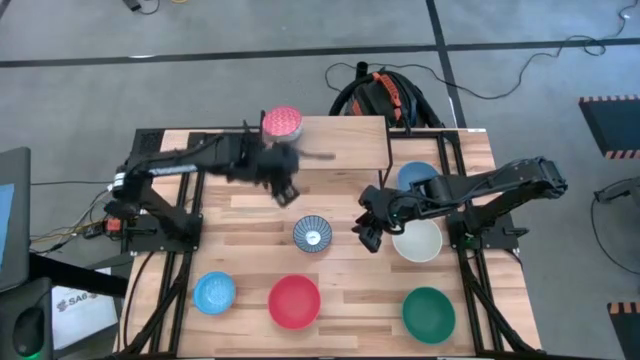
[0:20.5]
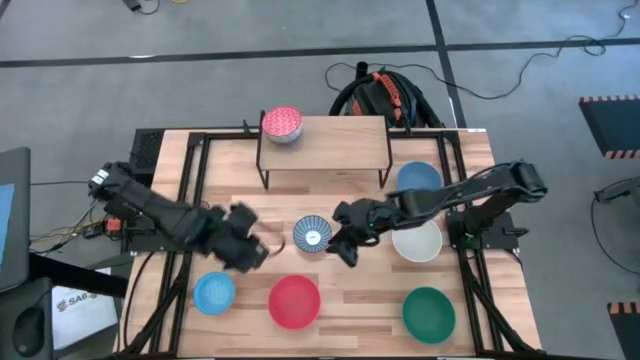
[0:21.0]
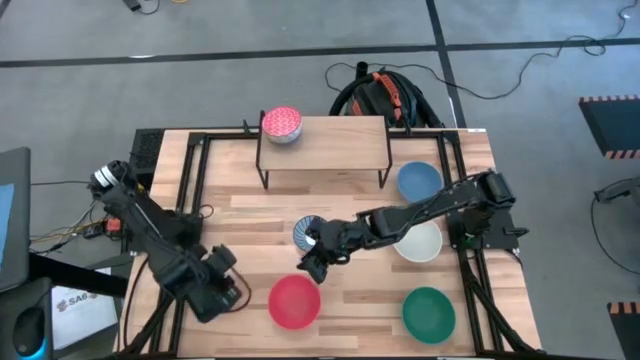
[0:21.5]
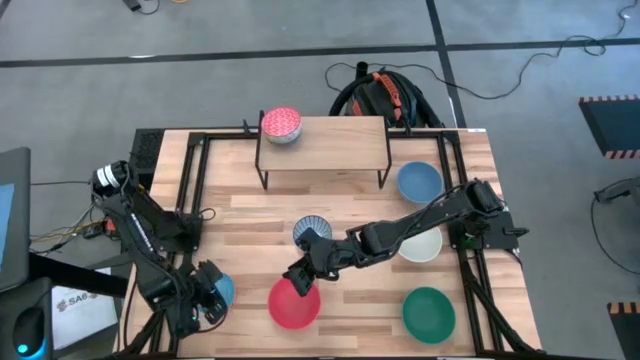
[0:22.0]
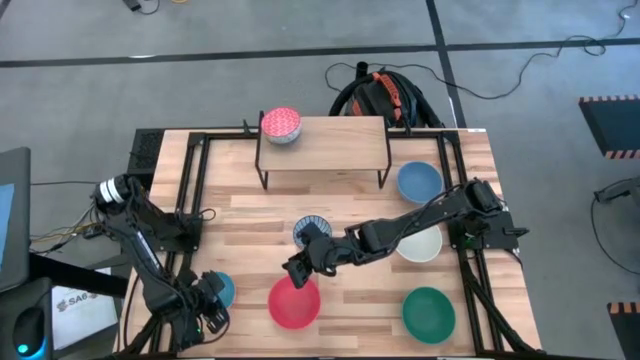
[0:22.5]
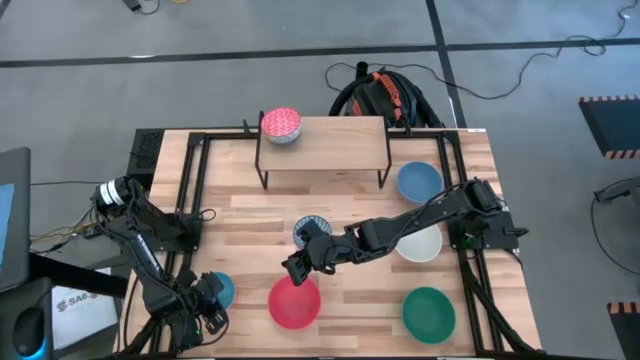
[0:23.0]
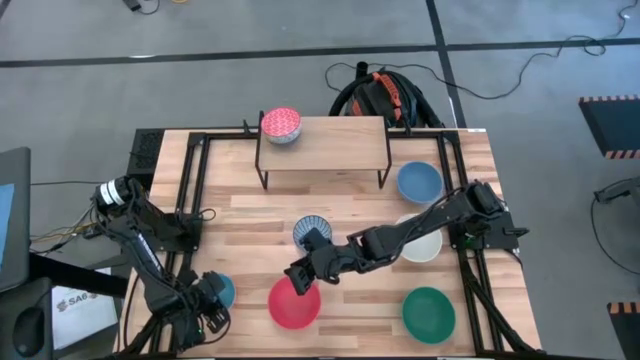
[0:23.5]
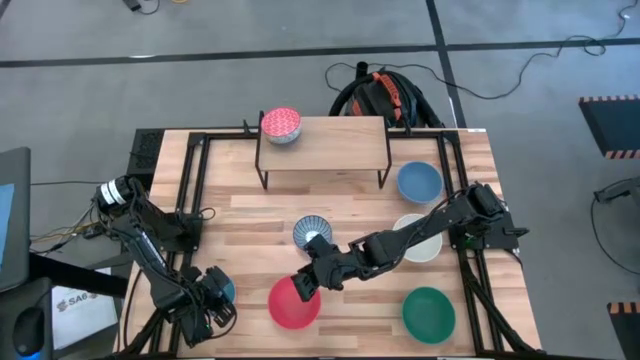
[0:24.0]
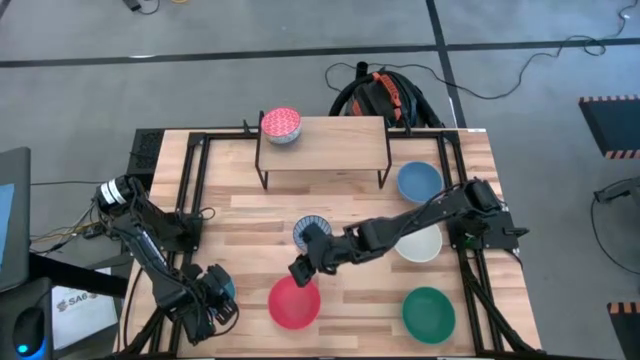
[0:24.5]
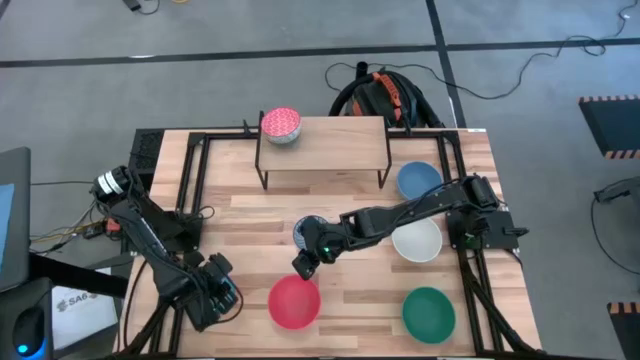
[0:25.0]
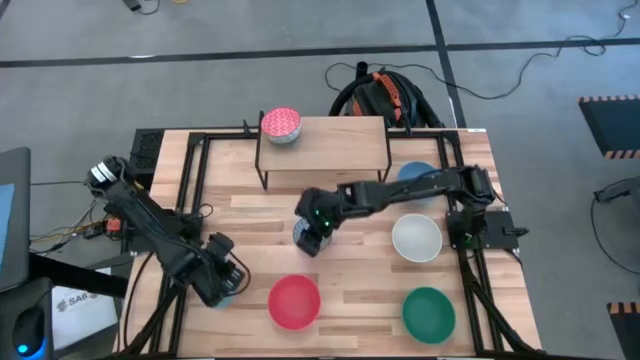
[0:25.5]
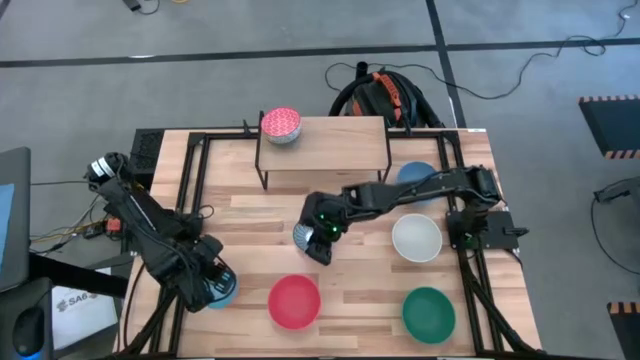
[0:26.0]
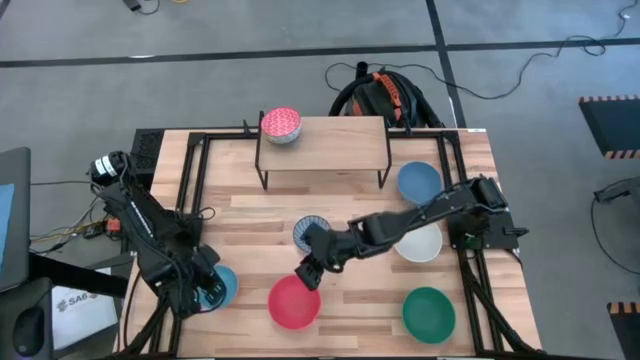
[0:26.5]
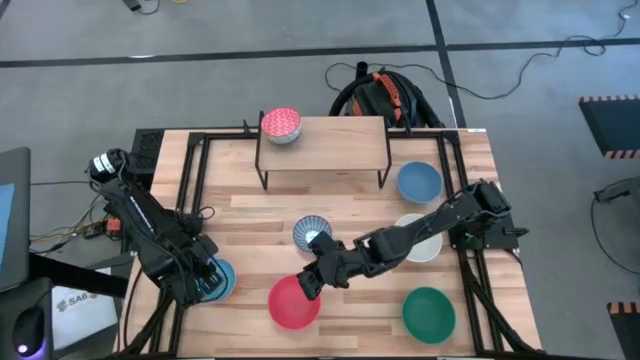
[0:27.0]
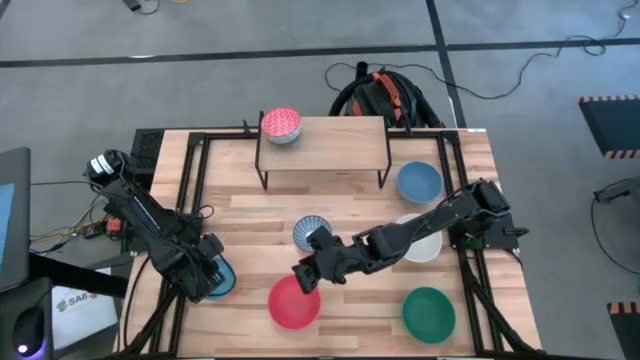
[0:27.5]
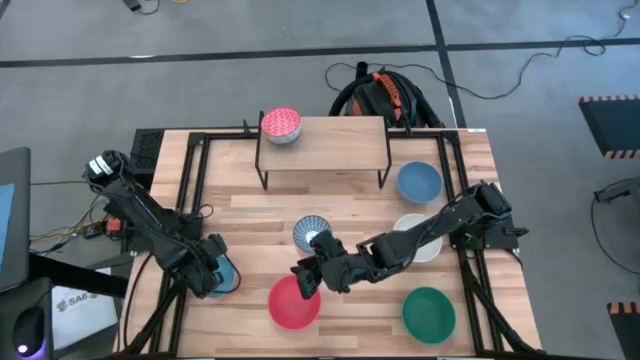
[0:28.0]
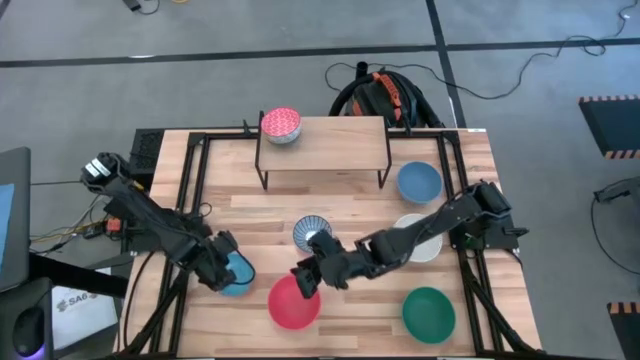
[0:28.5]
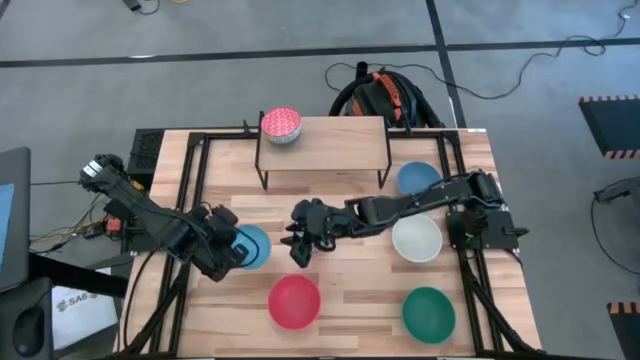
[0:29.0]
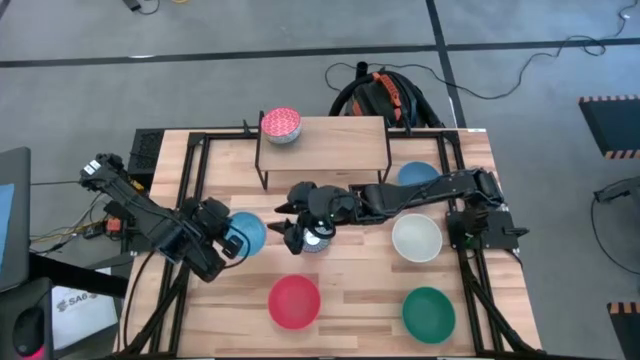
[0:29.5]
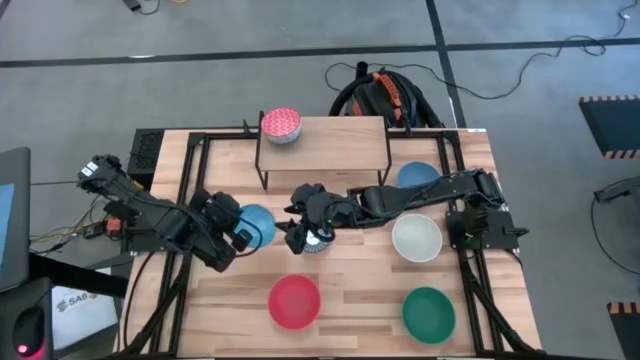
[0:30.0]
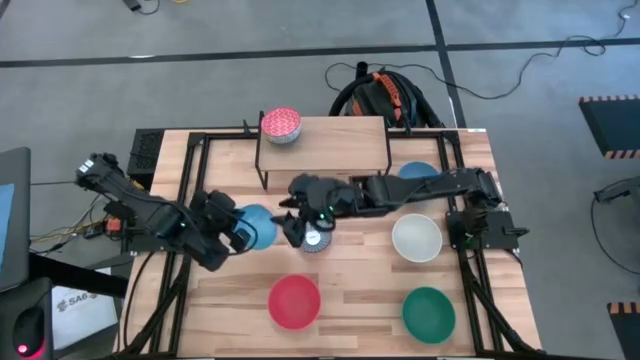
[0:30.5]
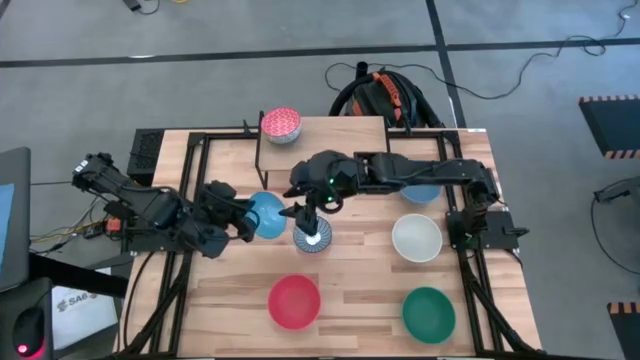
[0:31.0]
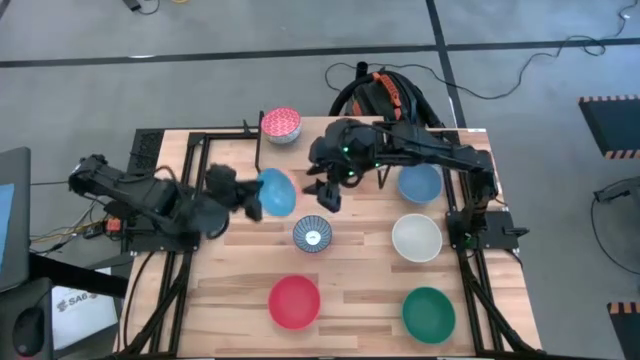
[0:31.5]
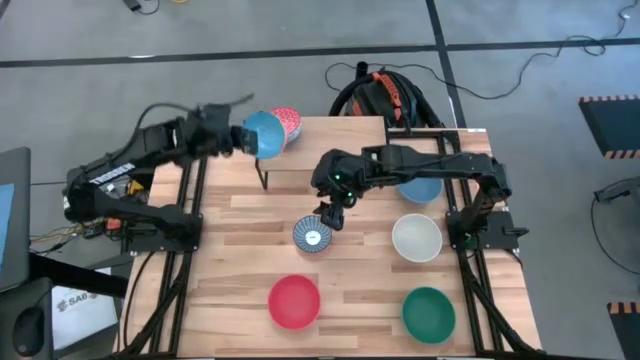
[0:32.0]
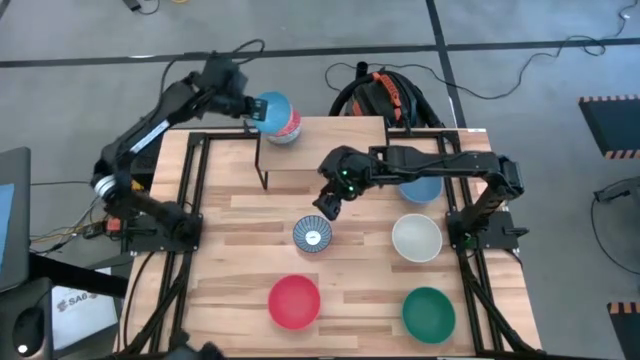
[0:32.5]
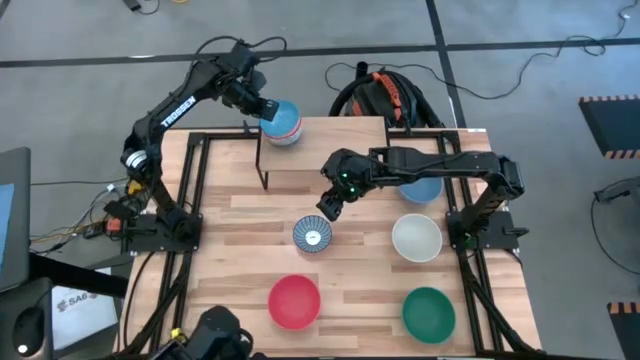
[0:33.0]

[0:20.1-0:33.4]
Task: Place and stack bowls onto a shelf
Stack the light blue pattern bowl on top of the red pattern bowl on the shelf

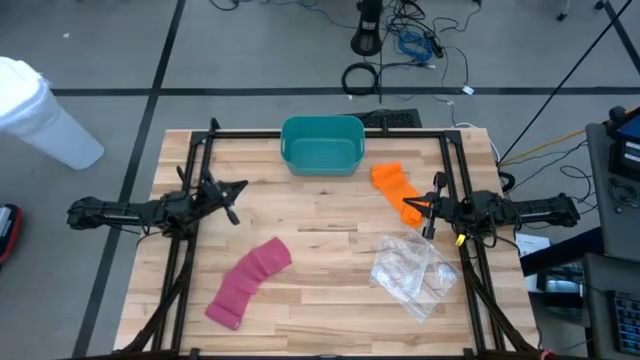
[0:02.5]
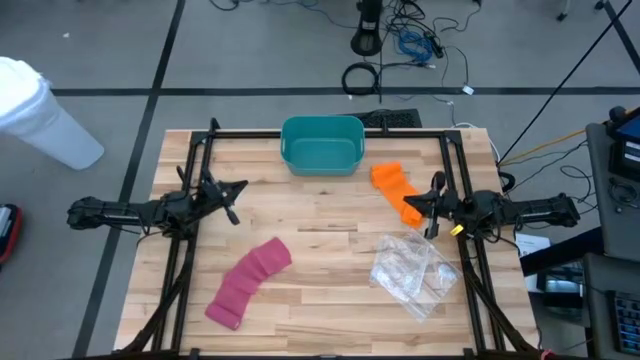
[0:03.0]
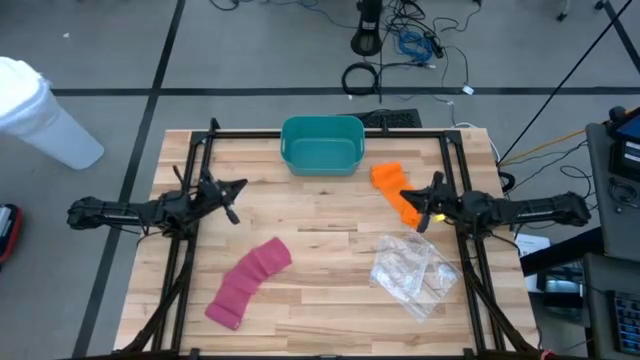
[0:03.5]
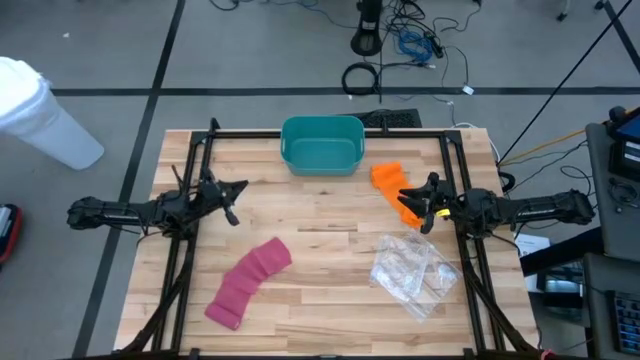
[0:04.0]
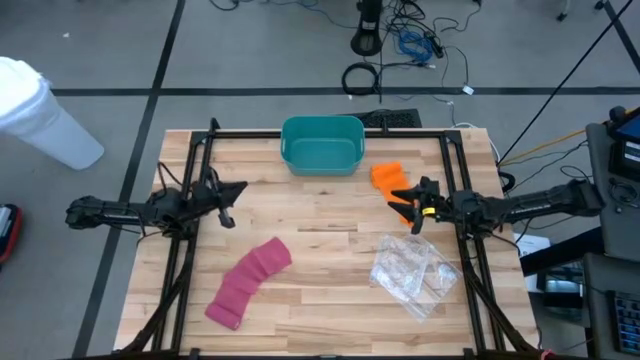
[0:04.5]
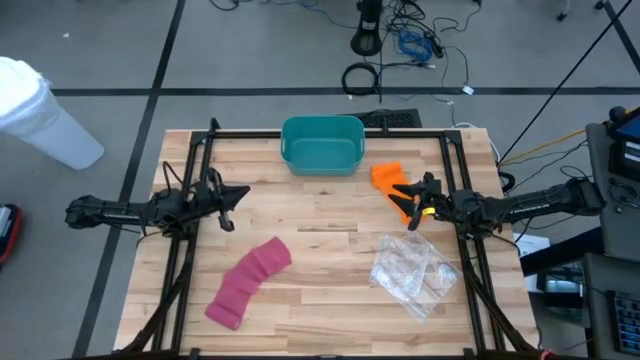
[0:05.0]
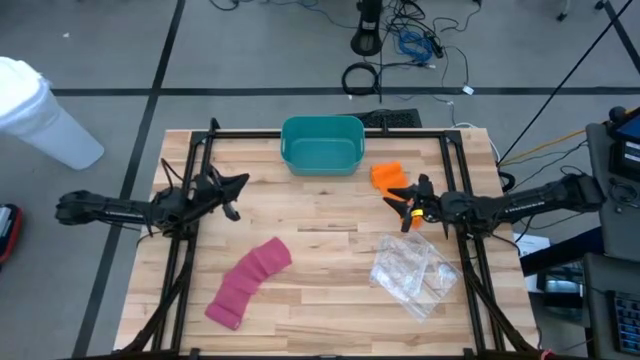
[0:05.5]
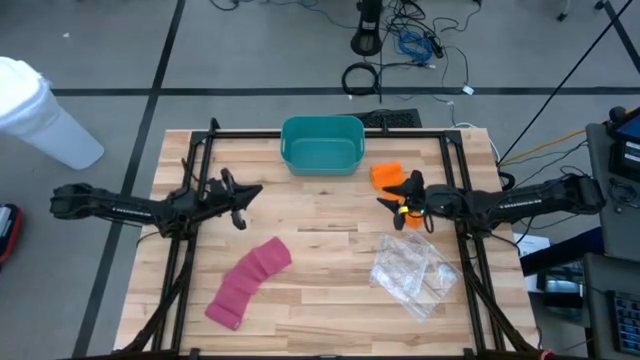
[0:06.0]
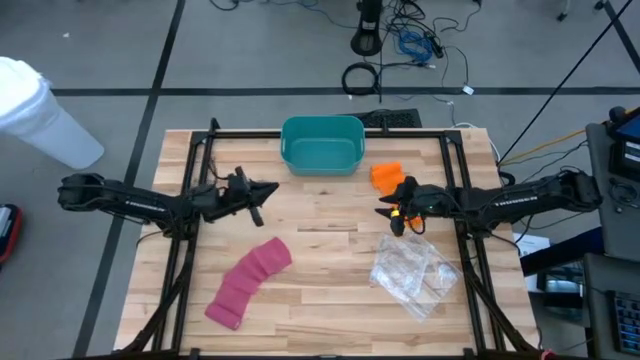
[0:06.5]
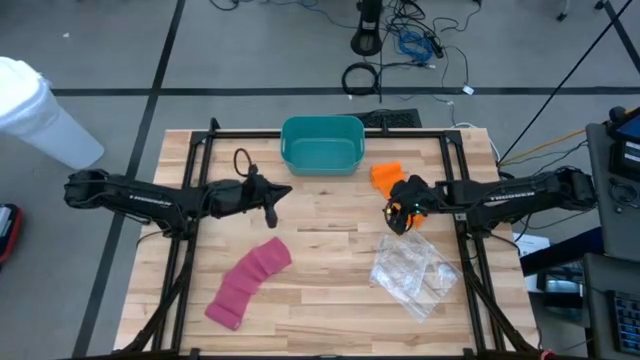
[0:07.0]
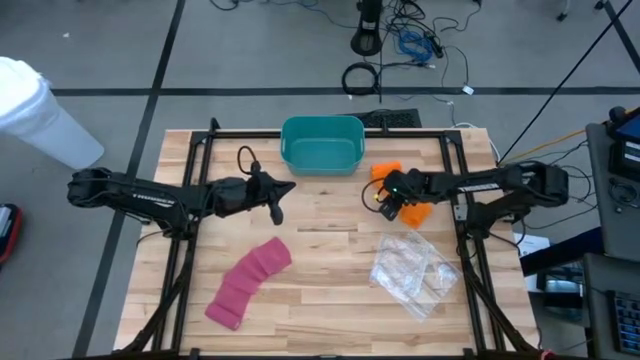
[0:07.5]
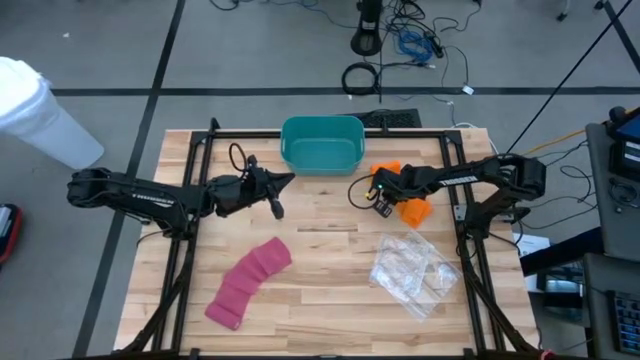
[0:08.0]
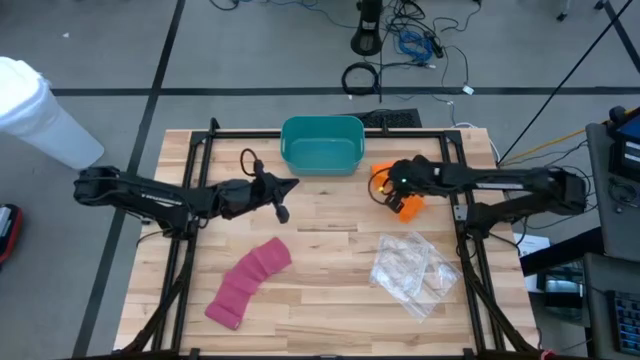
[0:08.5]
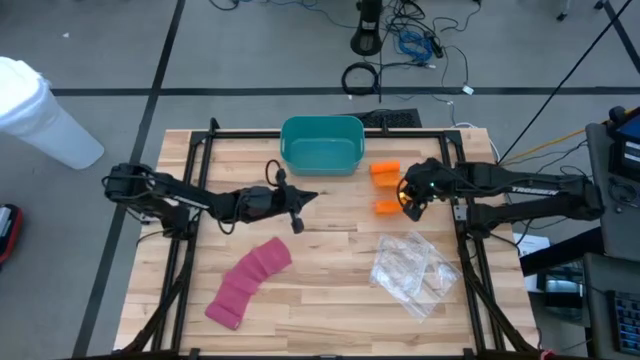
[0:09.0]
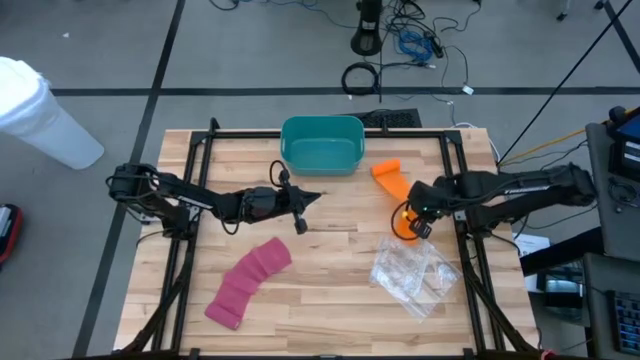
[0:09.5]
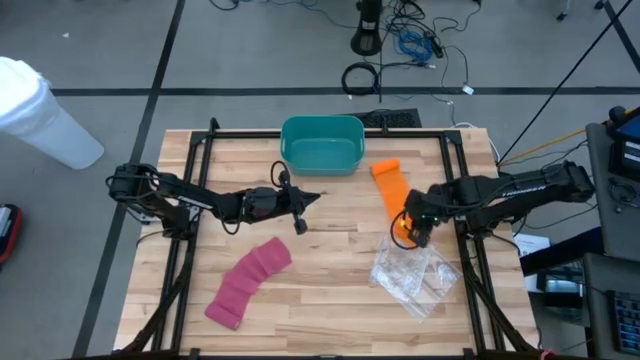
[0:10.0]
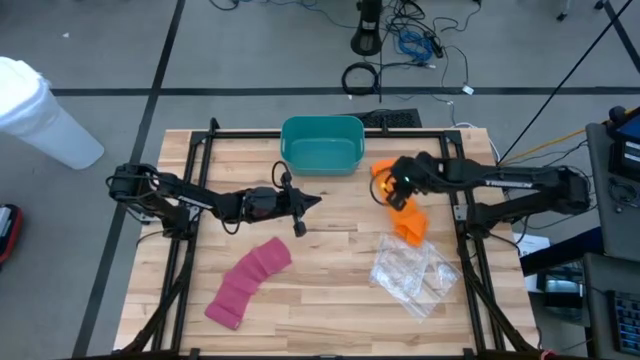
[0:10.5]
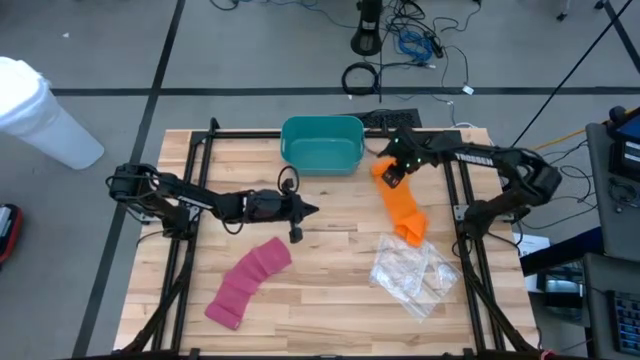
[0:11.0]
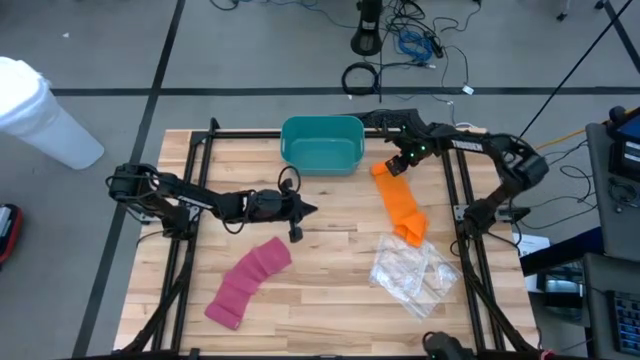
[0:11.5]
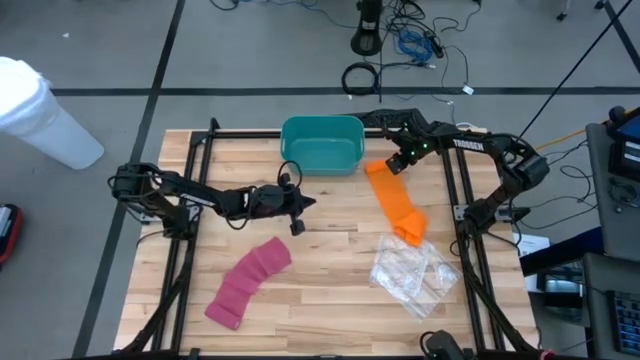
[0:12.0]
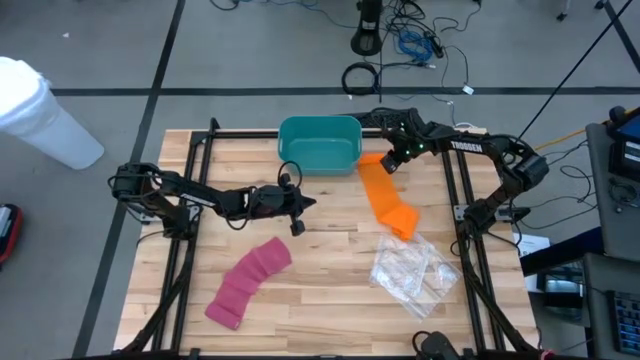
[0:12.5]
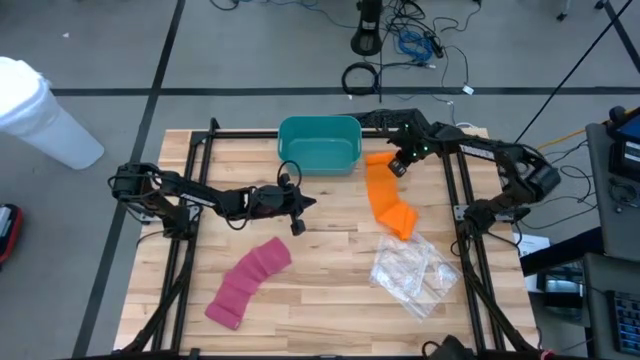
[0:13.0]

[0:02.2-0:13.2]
Task: Roll bandage
Roll the orange bandage
